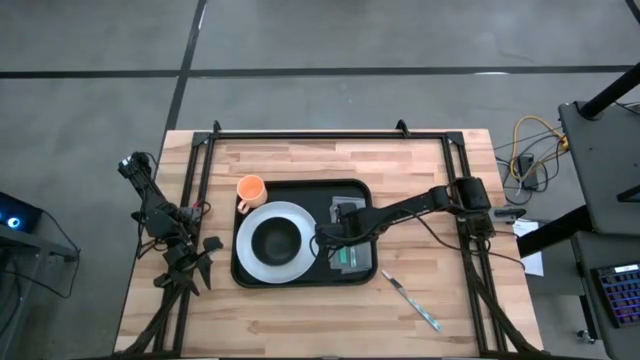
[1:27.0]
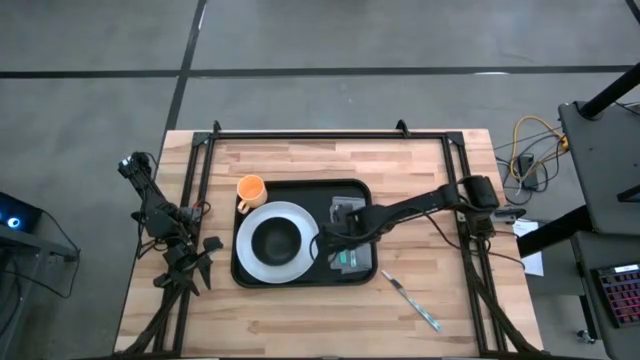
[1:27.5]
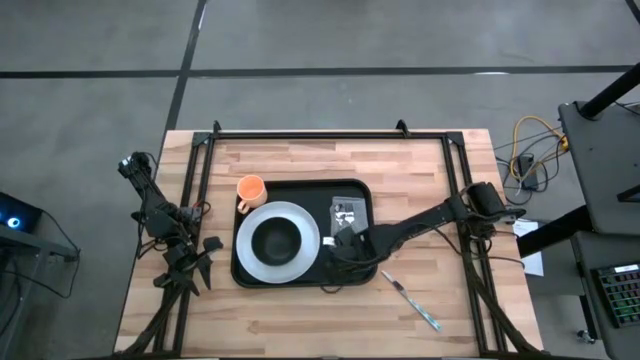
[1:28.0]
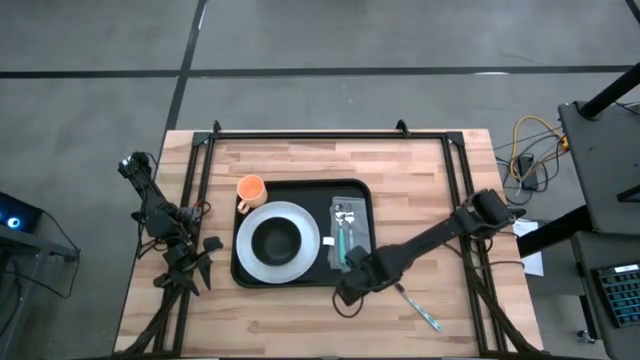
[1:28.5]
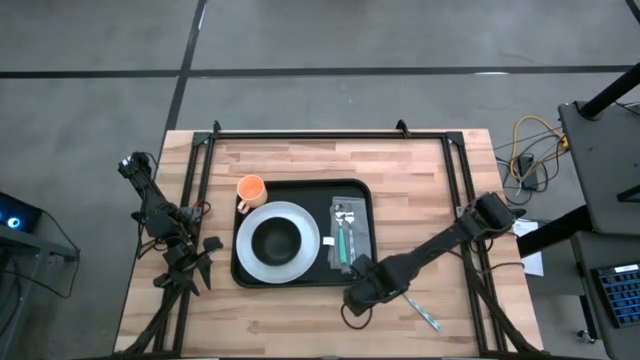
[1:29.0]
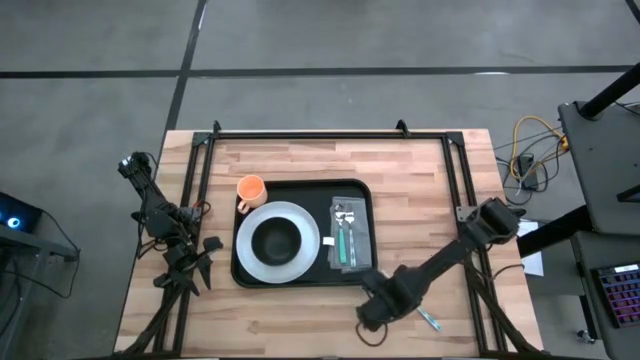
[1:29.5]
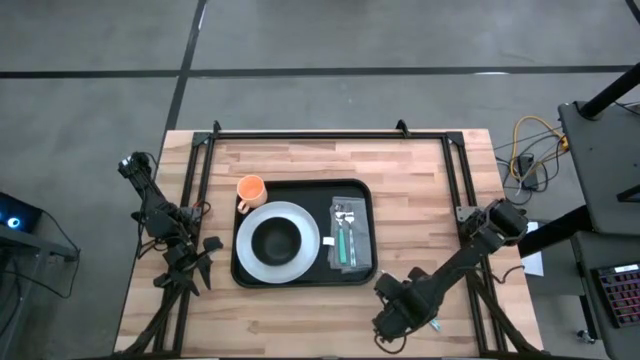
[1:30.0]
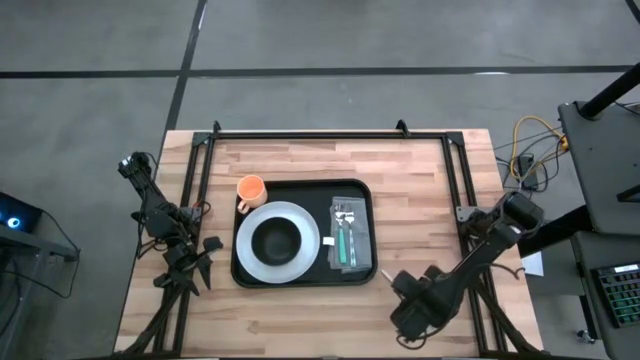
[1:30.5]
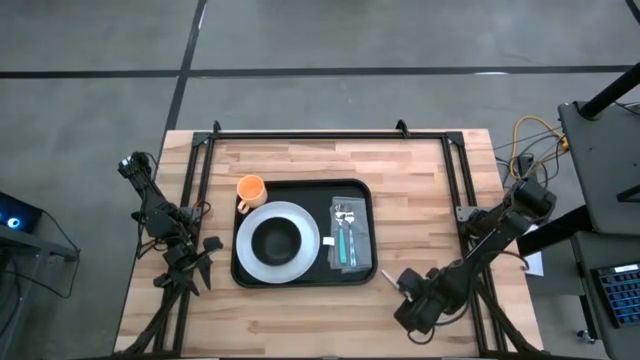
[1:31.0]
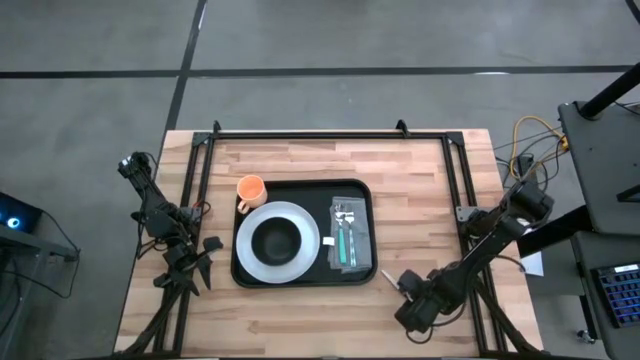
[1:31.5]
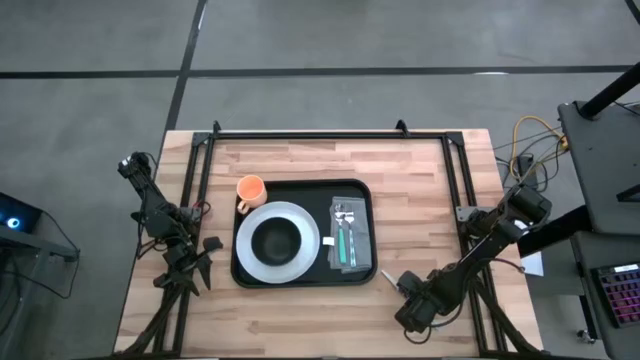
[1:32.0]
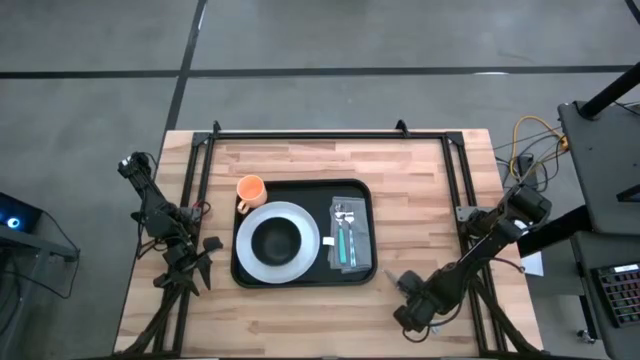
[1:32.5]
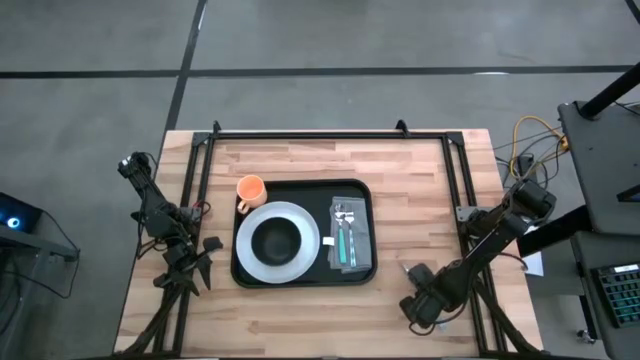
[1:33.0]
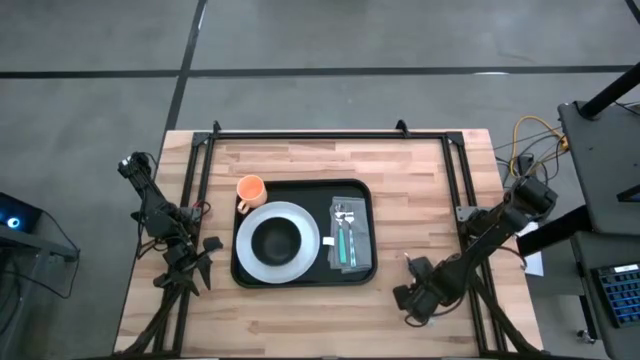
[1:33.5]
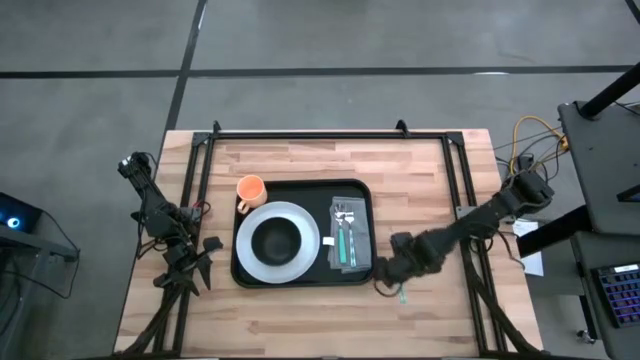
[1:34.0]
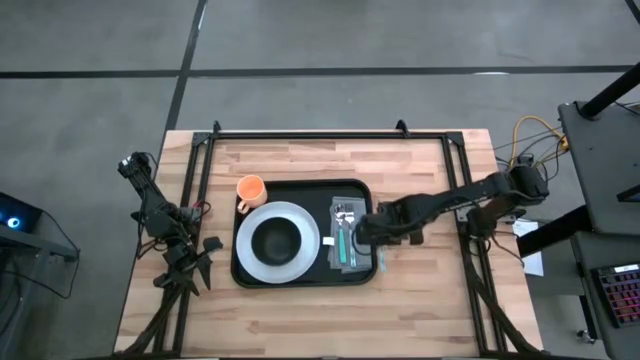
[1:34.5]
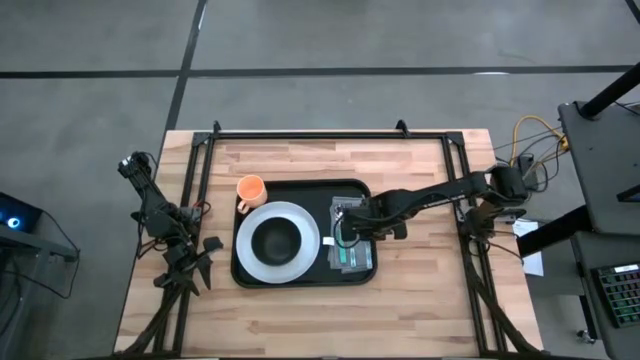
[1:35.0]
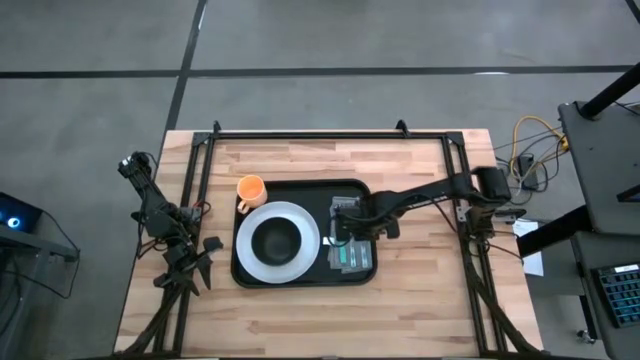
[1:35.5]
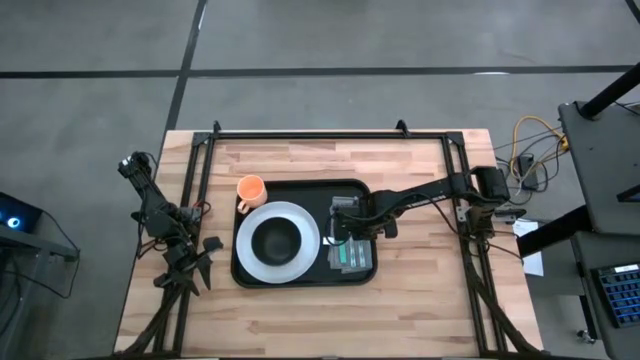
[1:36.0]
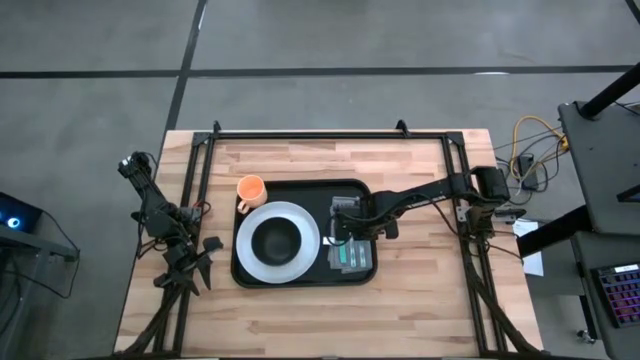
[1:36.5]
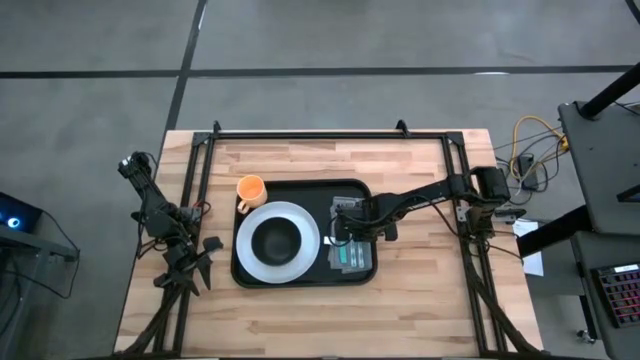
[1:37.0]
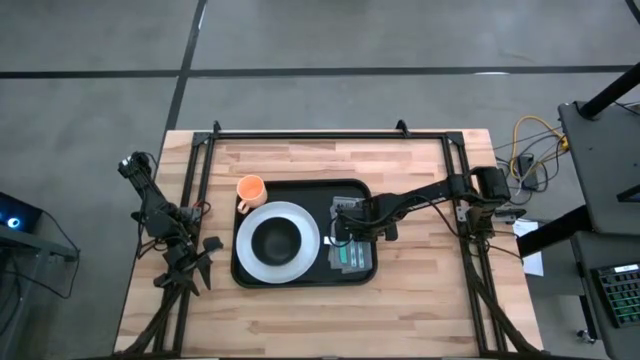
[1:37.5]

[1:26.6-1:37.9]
Task: Set up tray
Put the blue knife on the gray napkin

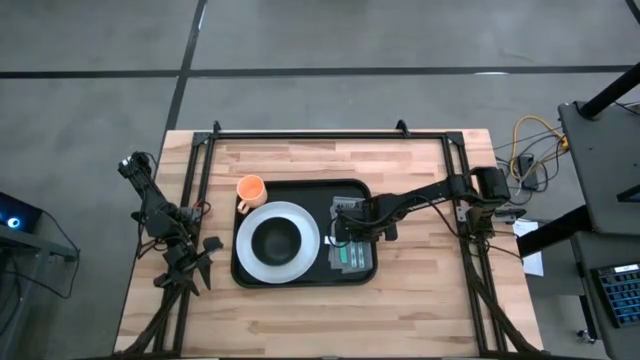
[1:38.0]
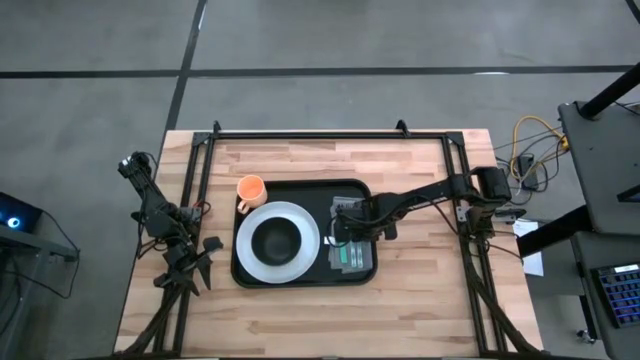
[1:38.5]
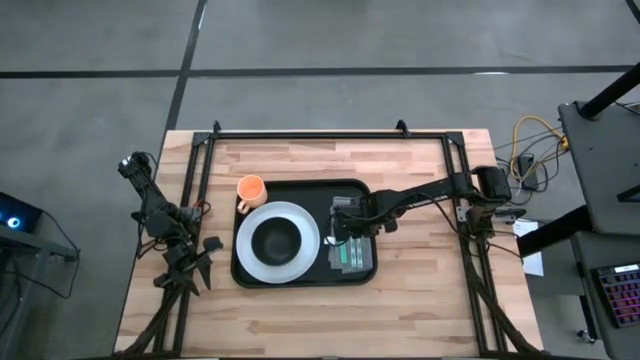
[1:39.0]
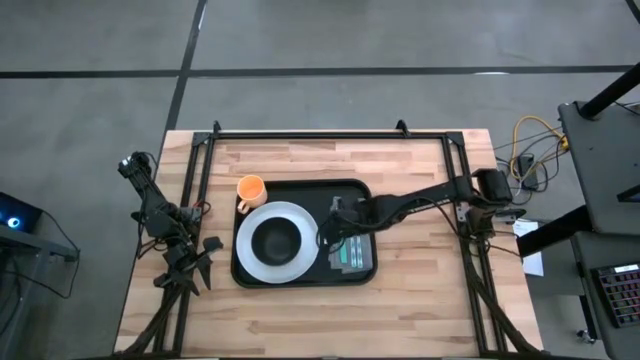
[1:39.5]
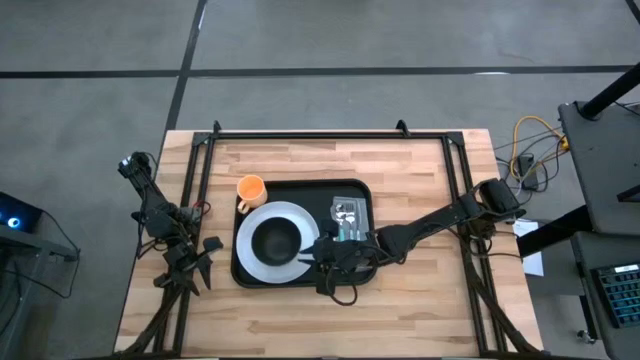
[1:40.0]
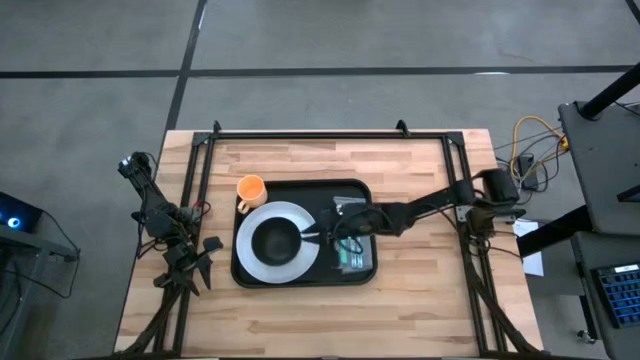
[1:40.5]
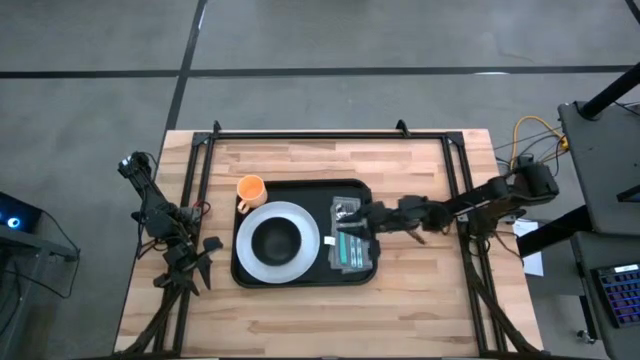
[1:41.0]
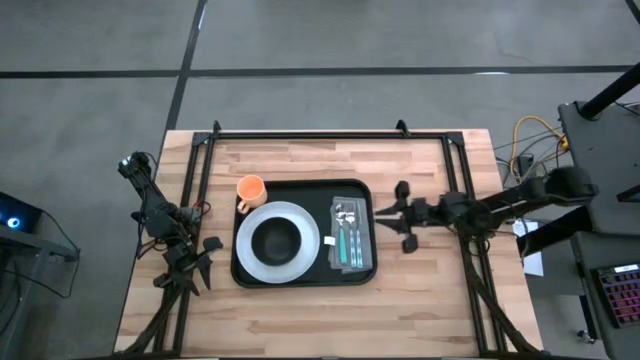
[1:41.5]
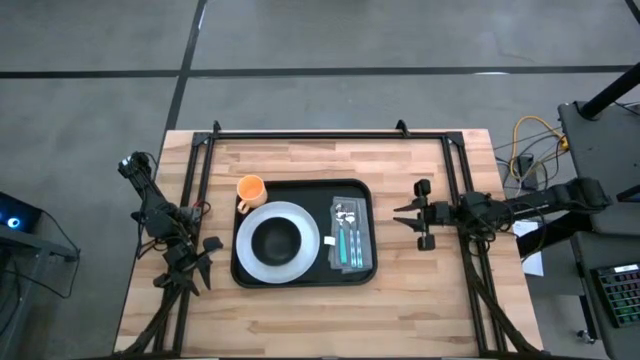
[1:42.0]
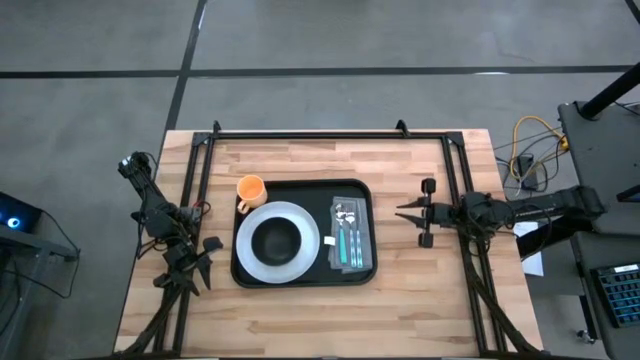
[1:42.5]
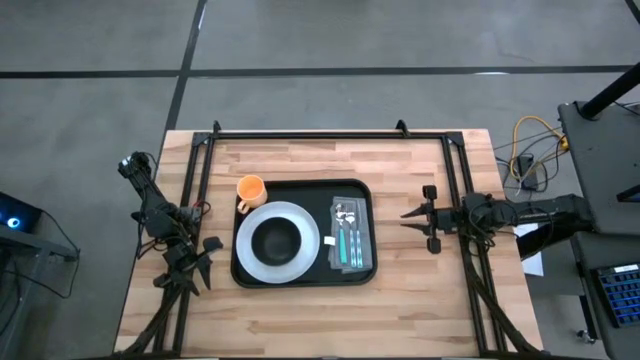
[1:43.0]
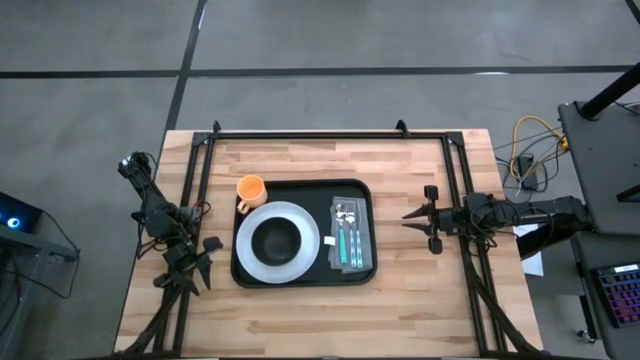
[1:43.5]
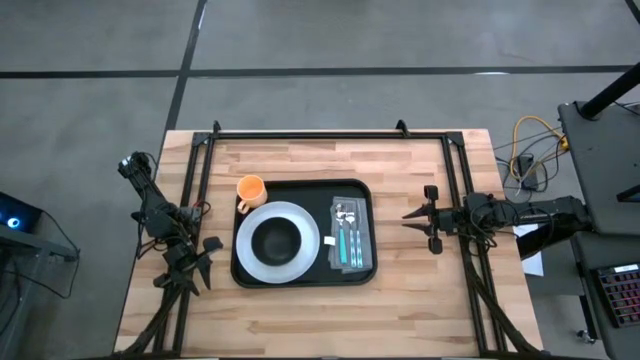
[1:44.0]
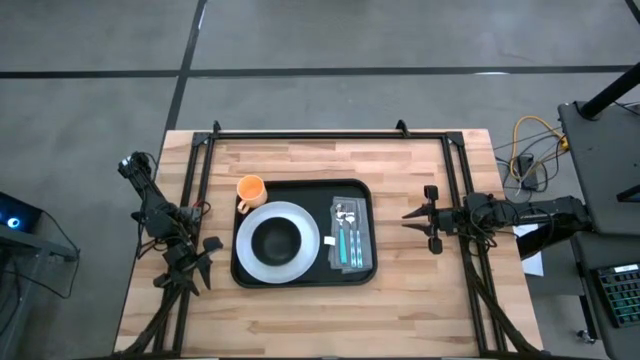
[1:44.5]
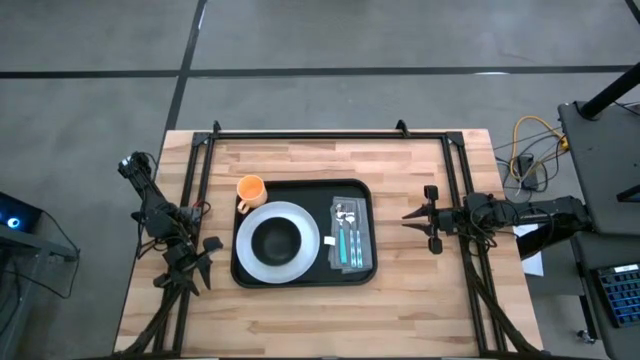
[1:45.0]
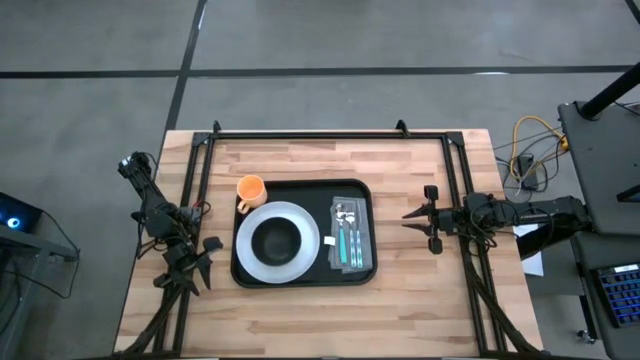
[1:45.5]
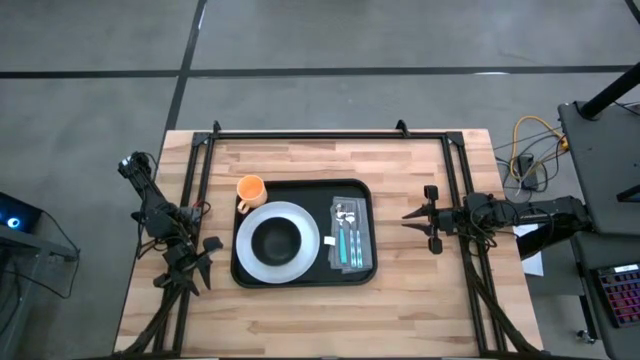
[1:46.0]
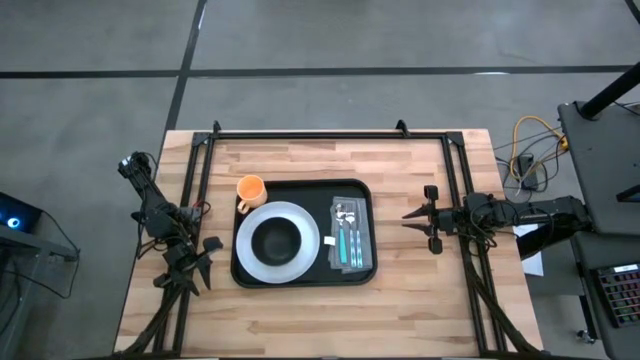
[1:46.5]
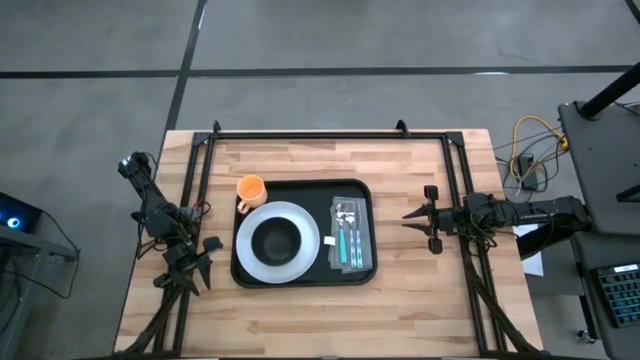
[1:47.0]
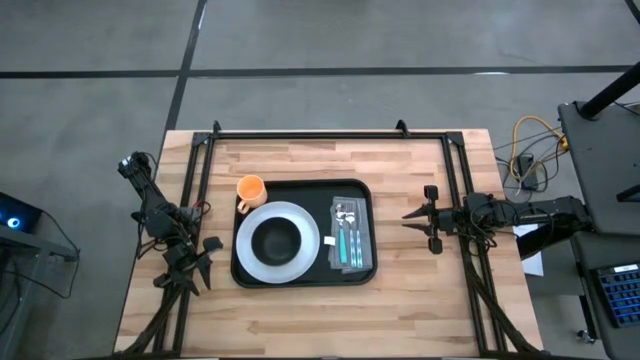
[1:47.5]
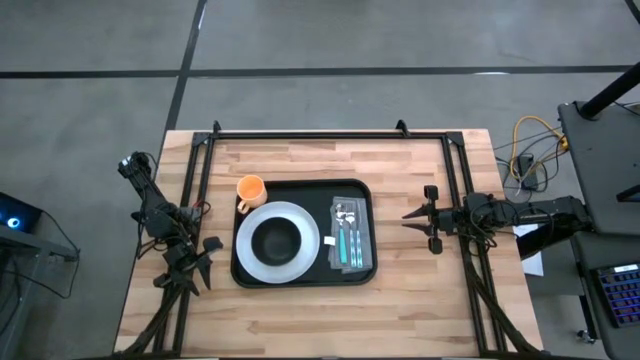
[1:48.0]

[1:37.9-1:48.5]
Return to Home Position
